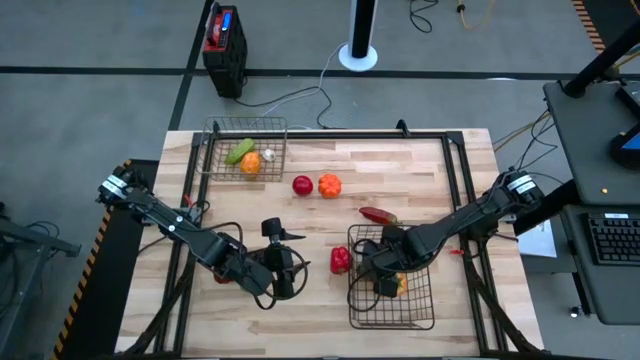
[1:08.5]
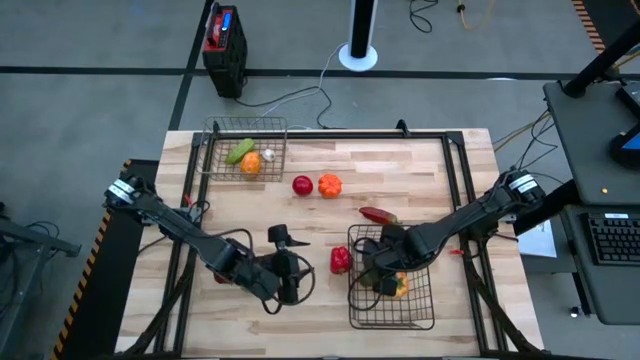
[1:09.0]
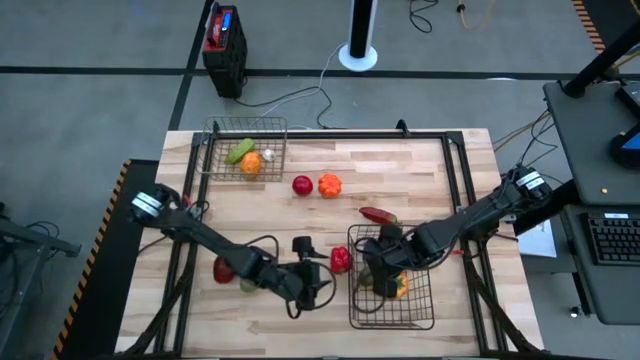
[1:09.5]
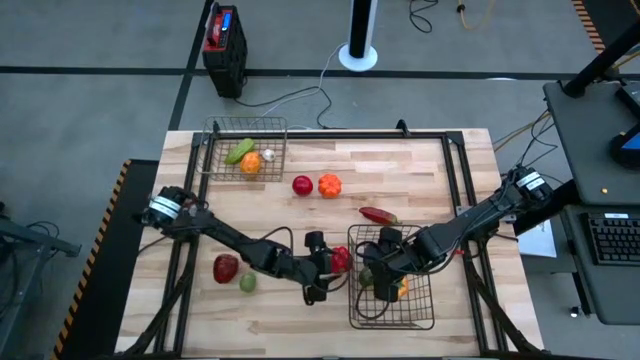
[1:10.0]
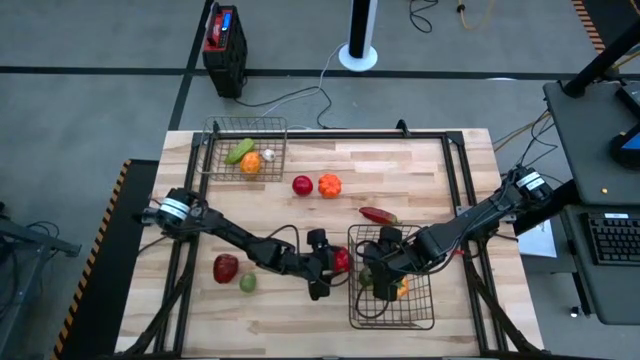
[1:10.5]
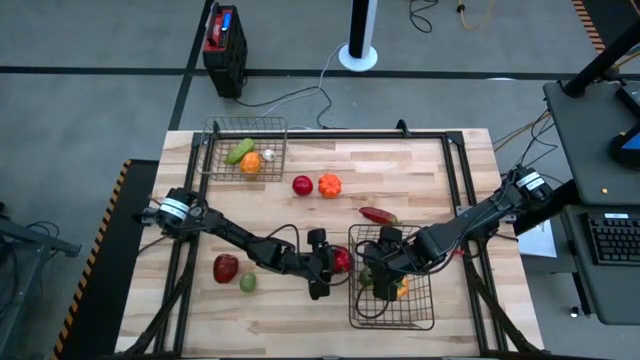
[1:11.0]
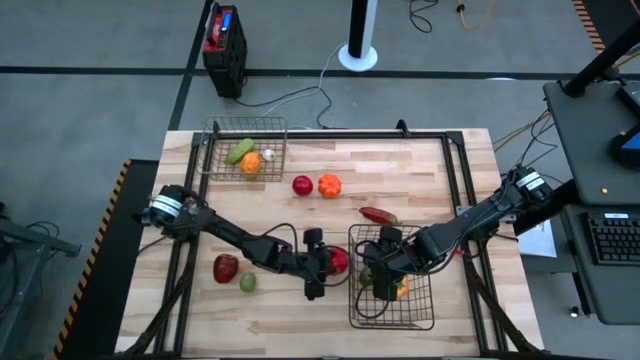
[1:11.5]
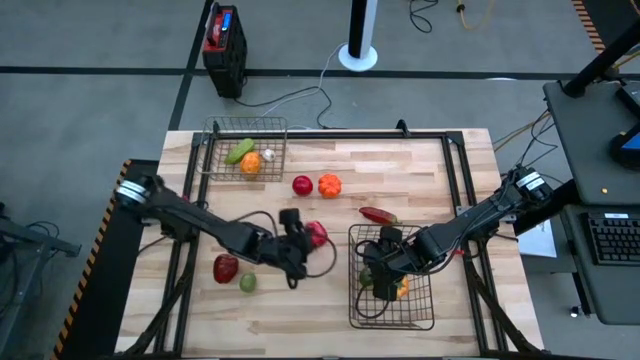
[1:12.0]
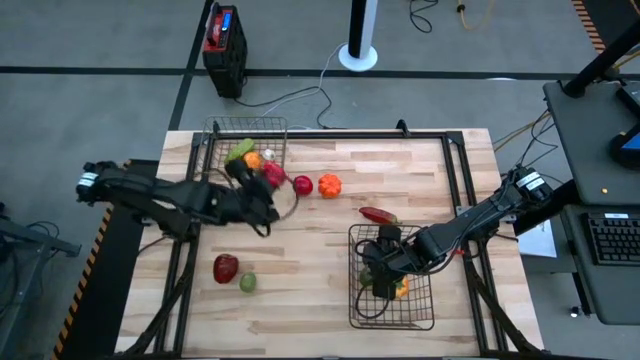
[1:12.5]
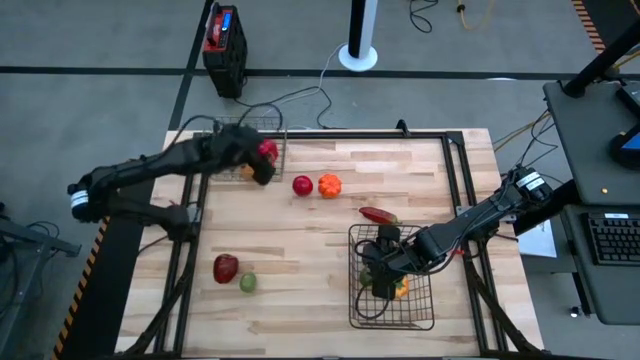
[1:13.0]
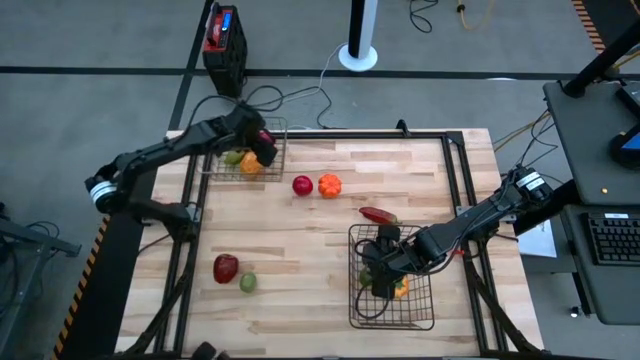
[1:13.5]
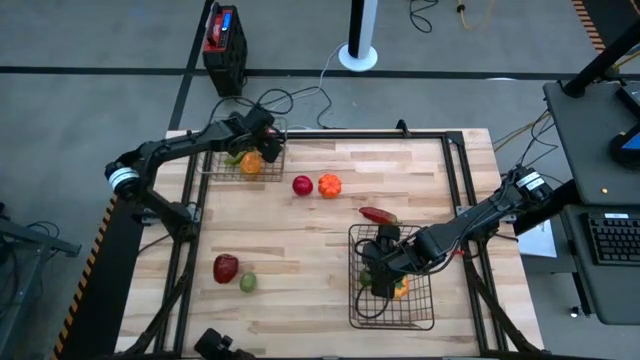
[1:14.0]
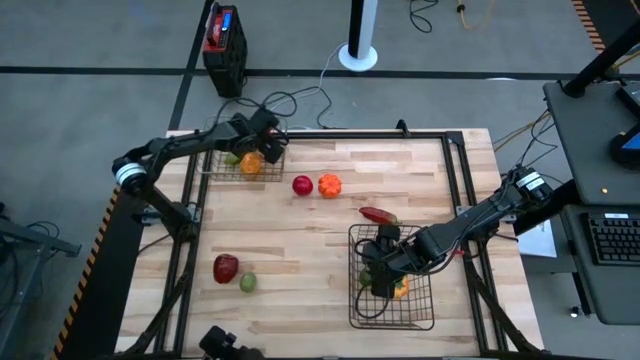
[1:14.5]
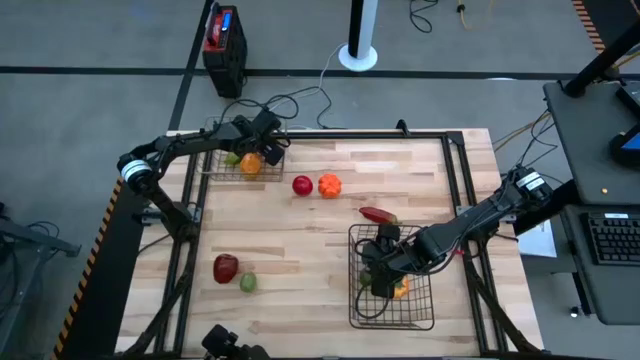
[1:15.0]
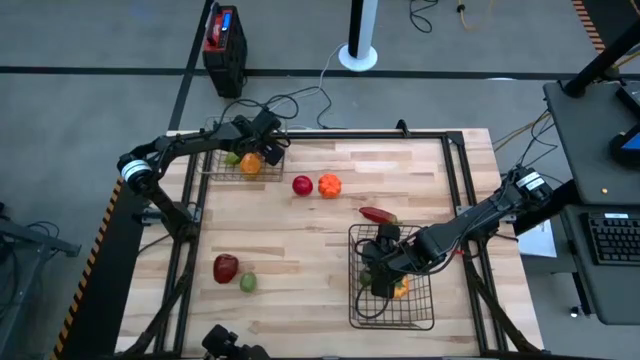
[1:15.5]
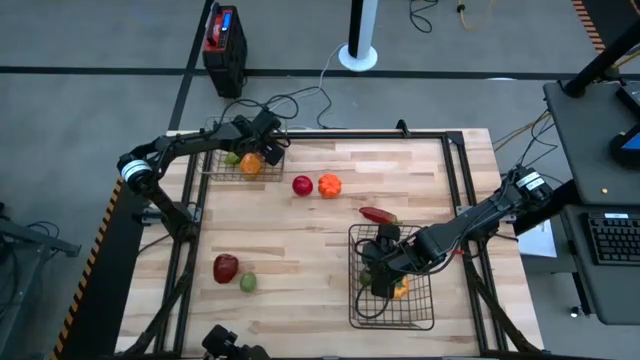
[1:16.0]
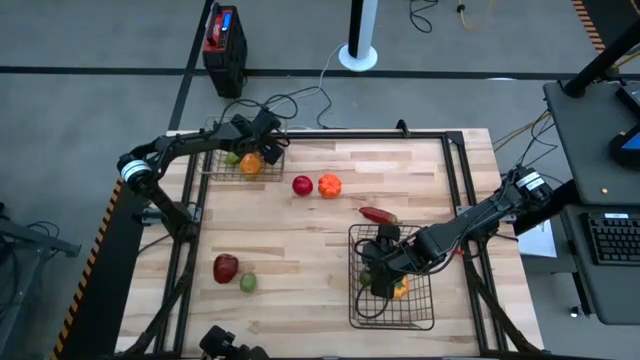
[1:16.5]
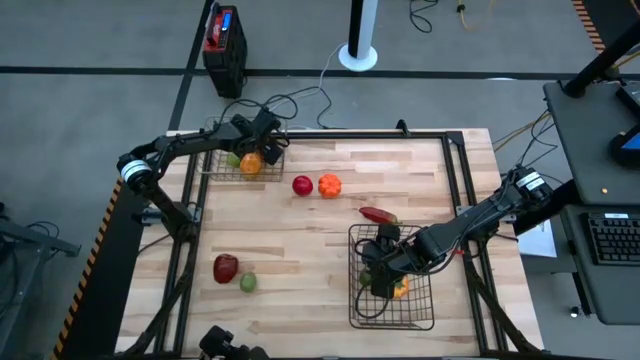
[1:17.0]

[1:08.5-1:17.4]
Task: Sort produce into baskets
Put the red bell pepper into the gold wire basket

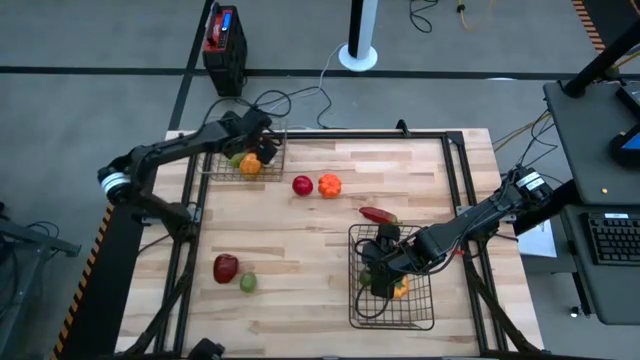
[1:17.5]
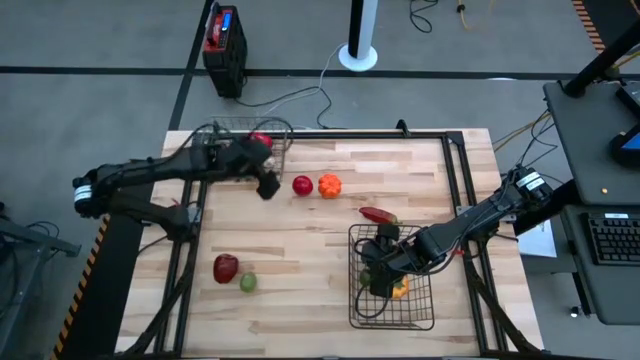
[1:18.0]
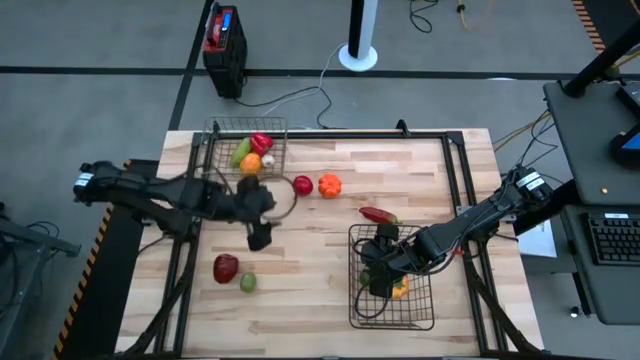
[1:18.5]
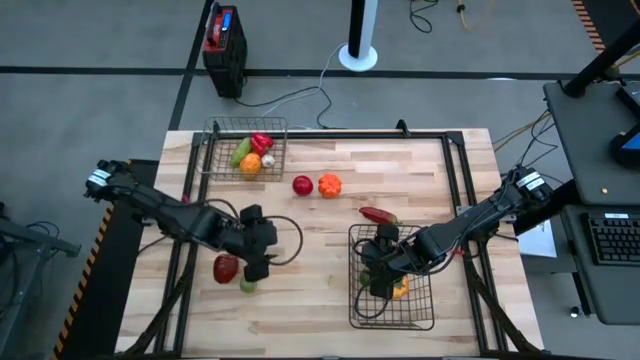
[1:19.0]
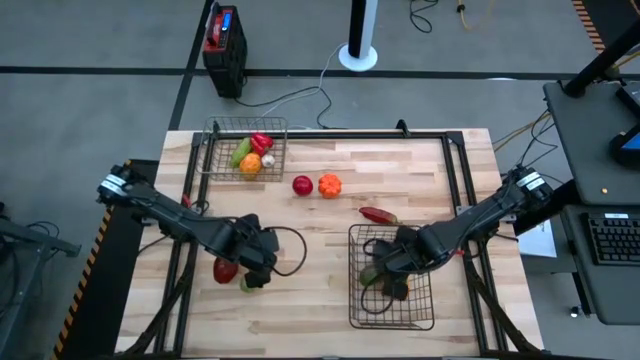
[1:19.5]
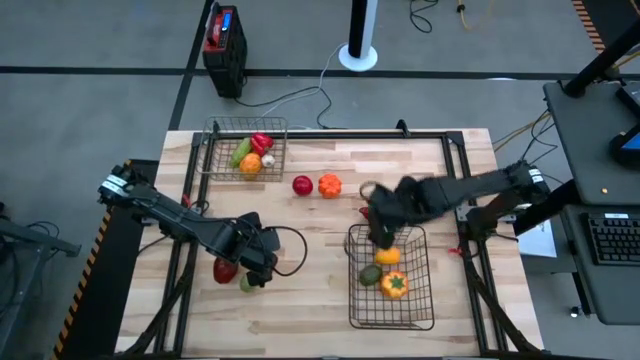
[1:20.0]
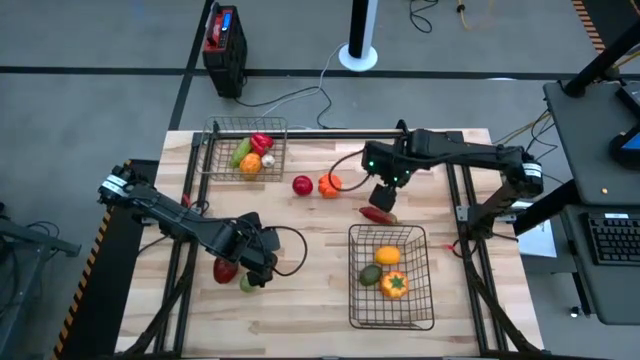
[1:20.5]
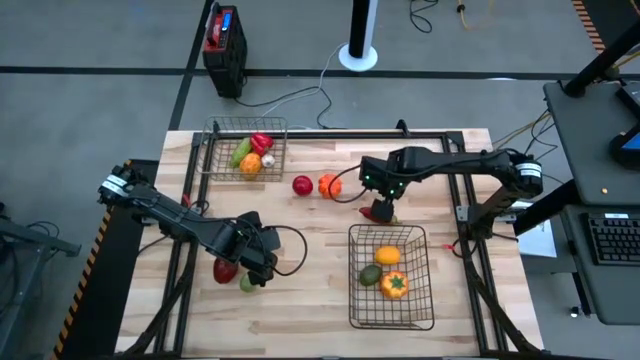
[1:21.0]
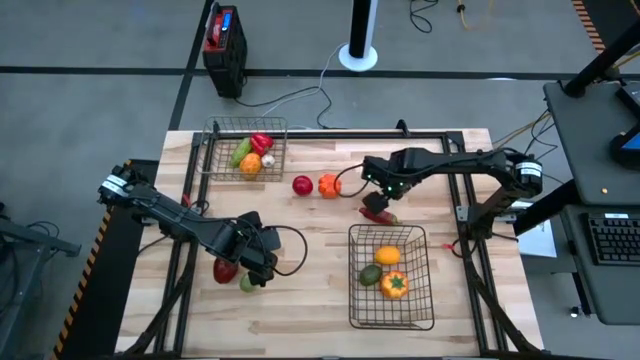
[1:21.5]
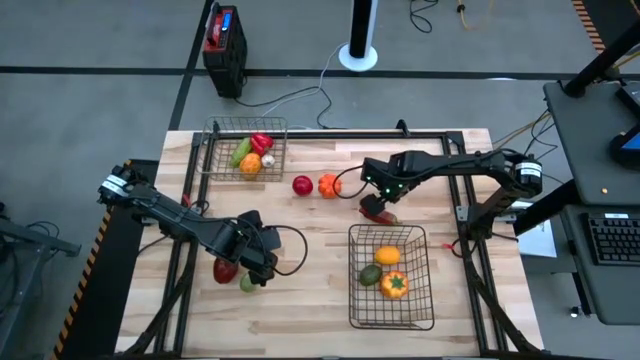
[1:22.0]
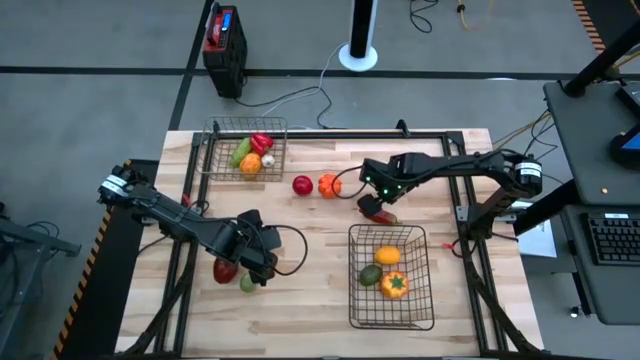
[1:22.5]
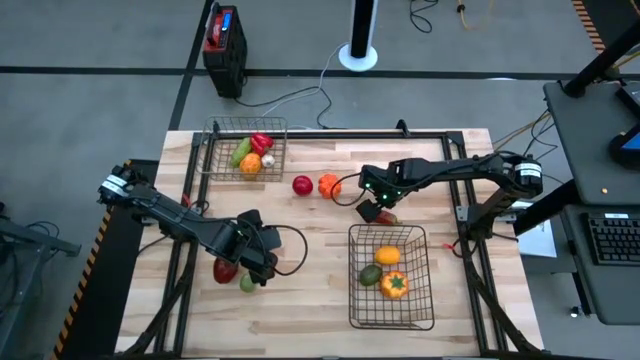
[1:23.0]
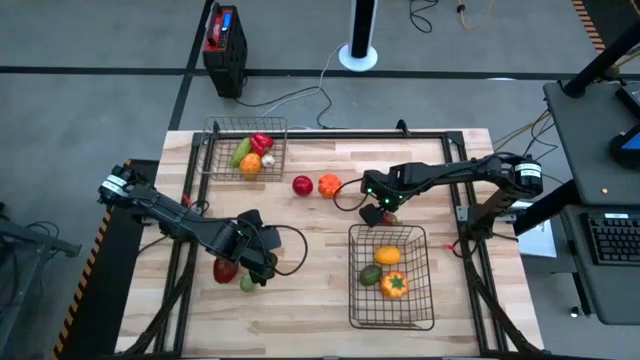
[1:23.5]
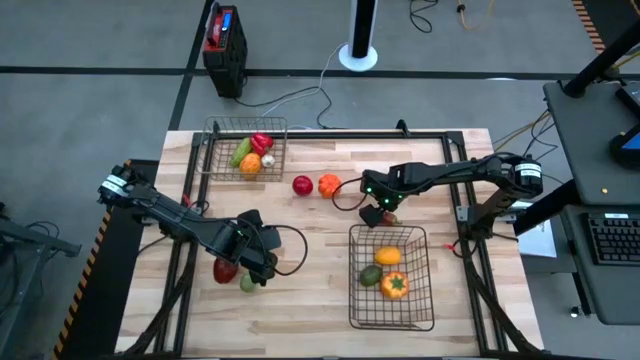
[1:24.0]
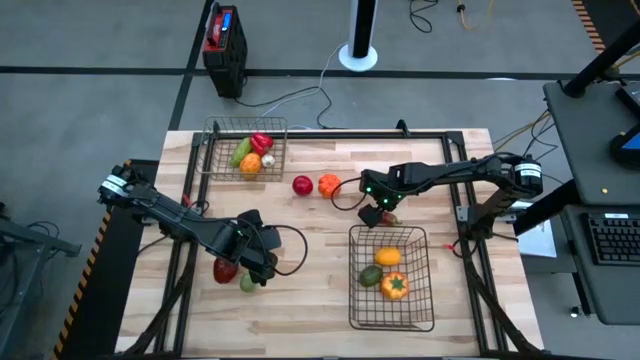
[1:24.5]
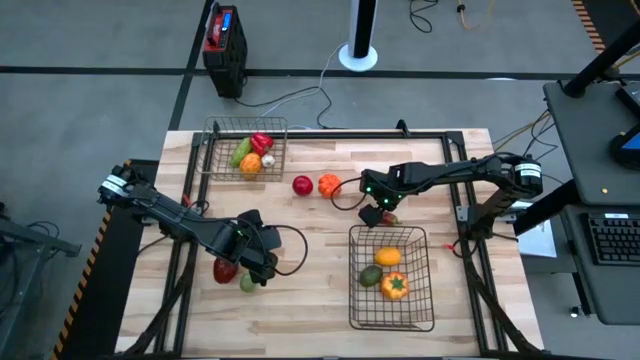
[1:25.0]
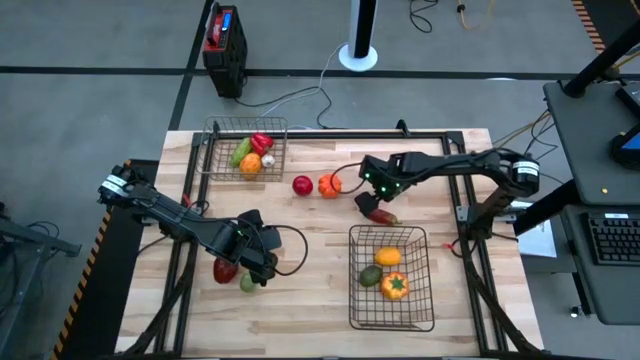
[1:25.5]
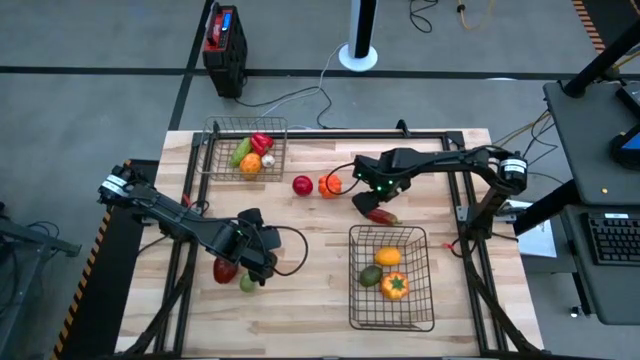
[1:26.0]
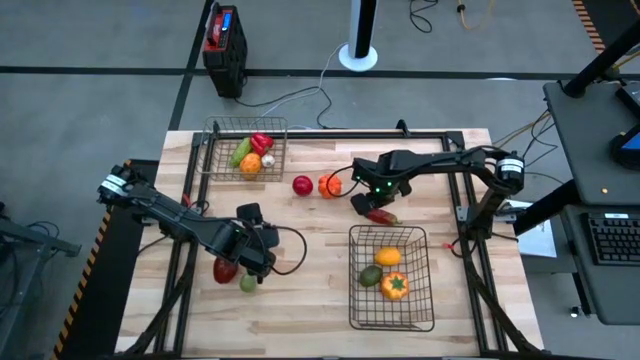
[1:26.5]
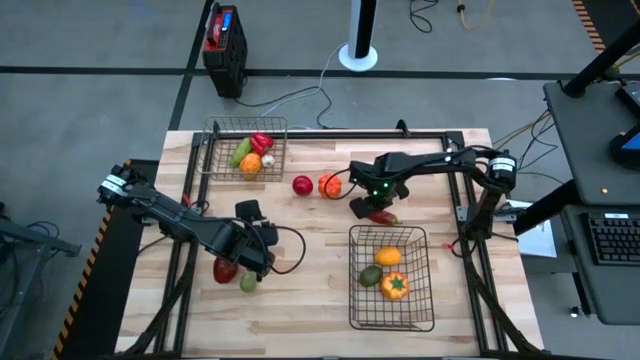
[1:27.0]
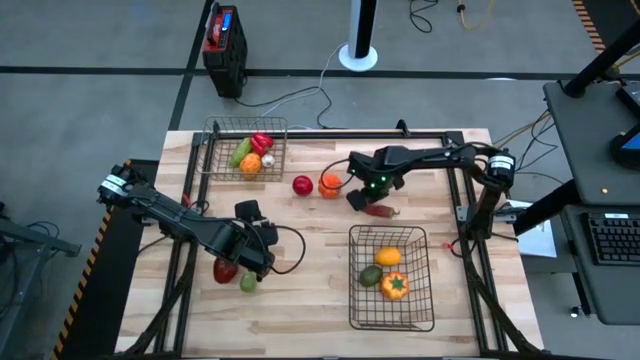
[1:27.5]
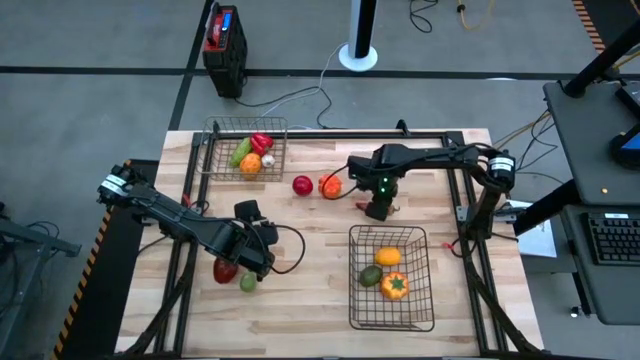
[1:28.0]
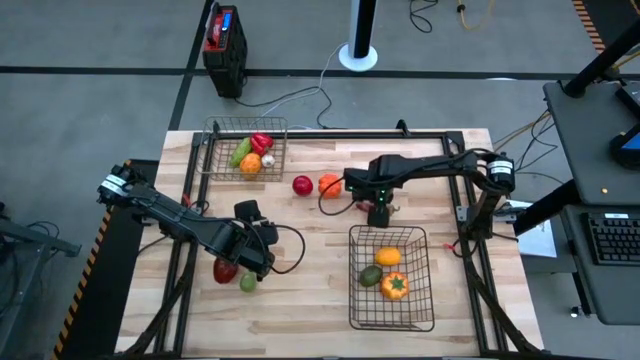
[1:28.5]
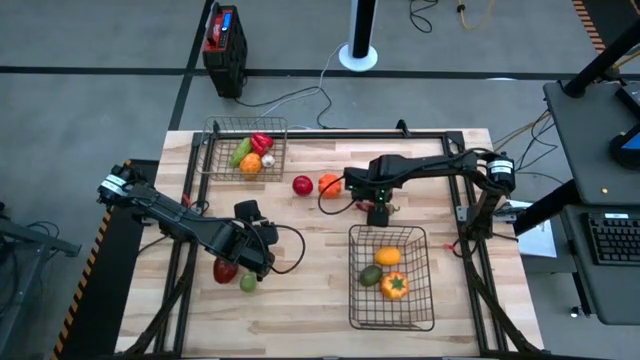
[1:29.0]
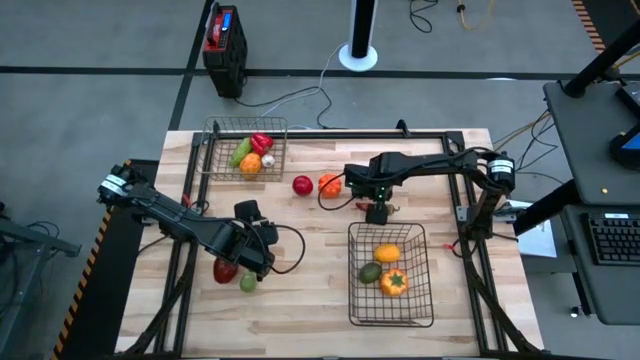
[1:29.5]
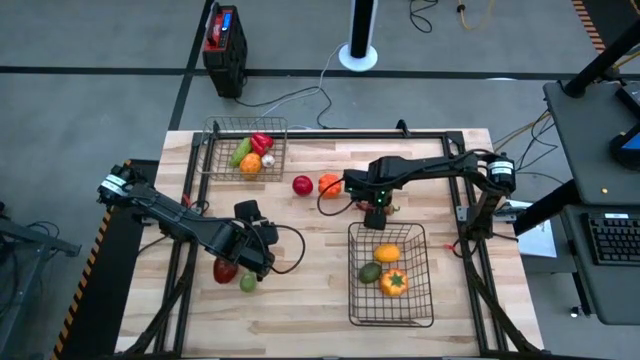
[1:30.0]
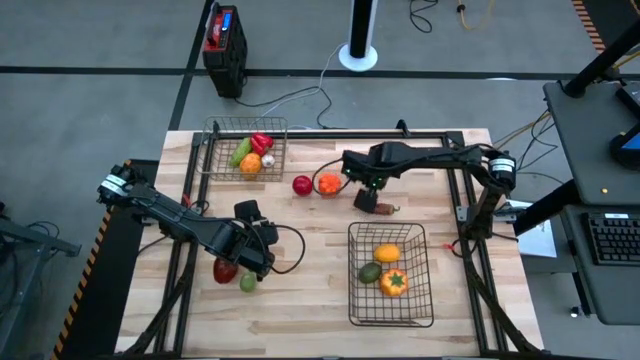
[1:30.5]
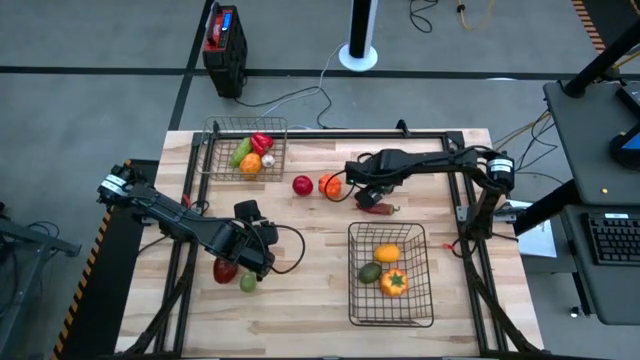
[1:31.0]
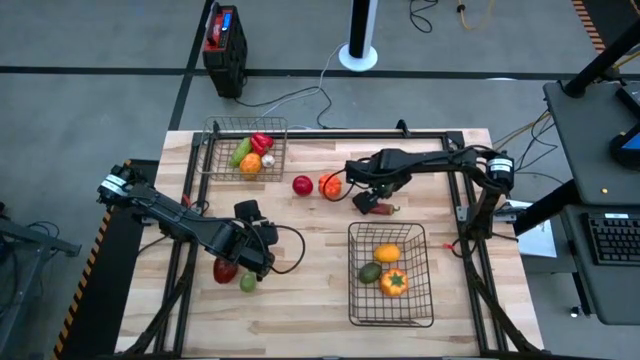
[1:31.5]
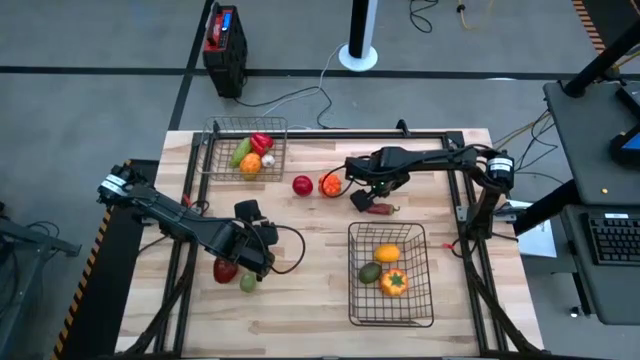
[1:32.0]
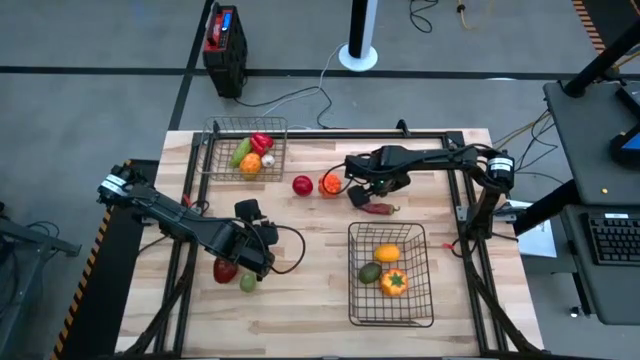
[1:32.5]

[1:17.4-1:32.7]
Put the red chili pepper into the gold wire basket
